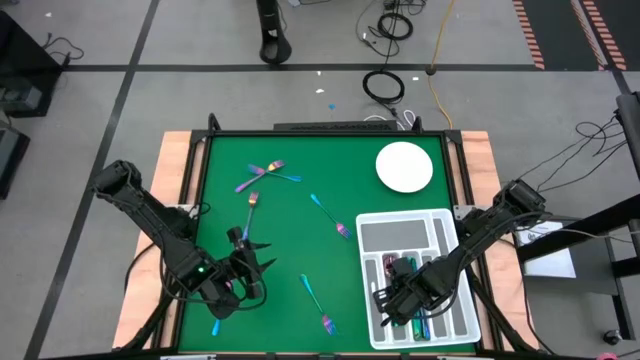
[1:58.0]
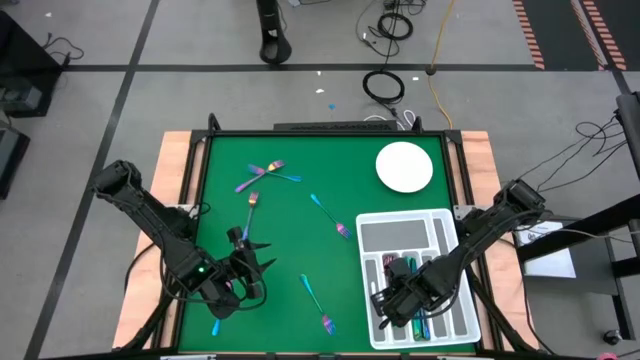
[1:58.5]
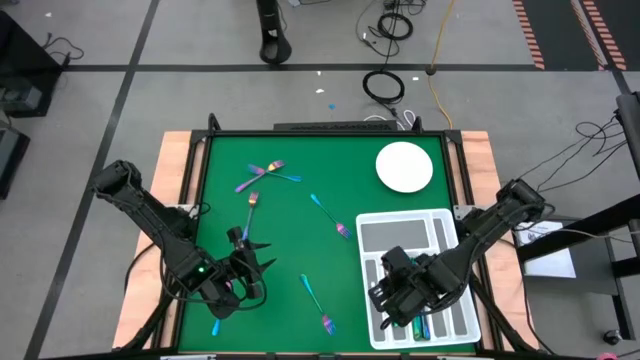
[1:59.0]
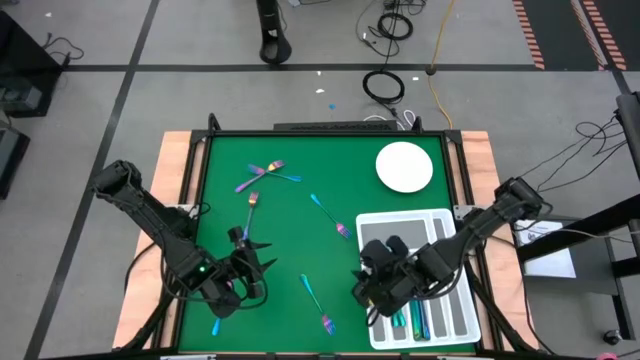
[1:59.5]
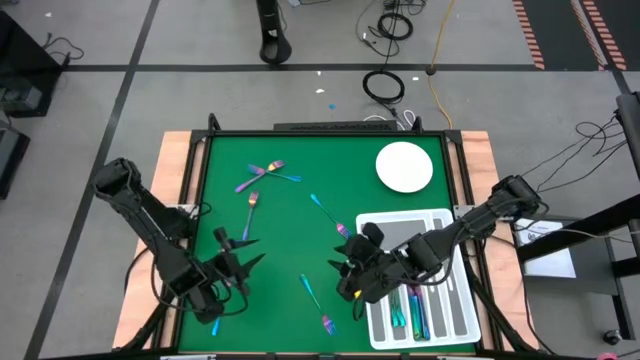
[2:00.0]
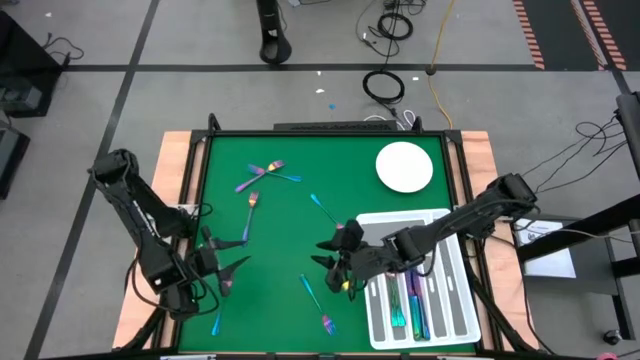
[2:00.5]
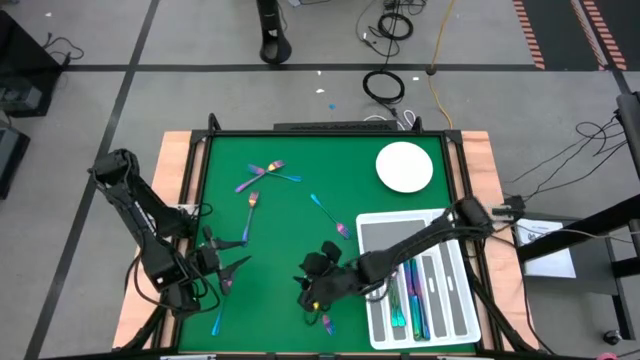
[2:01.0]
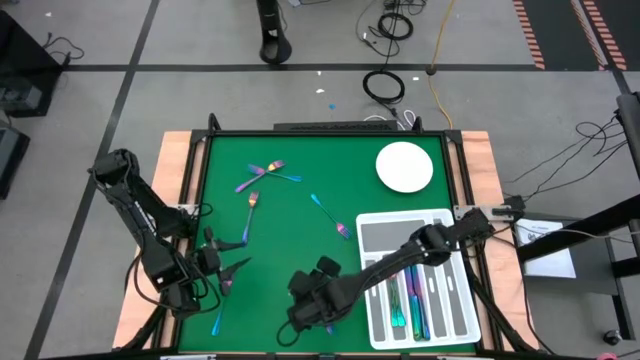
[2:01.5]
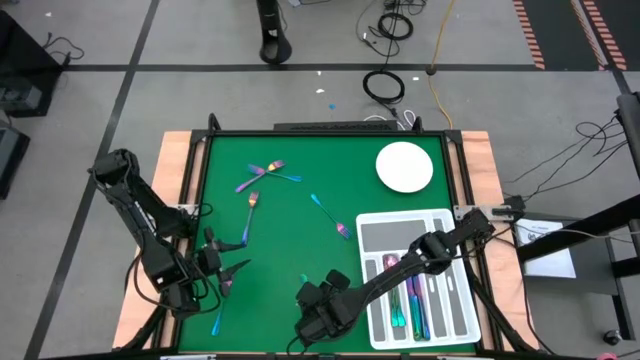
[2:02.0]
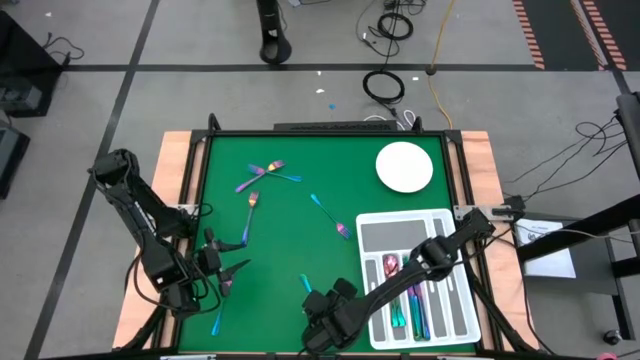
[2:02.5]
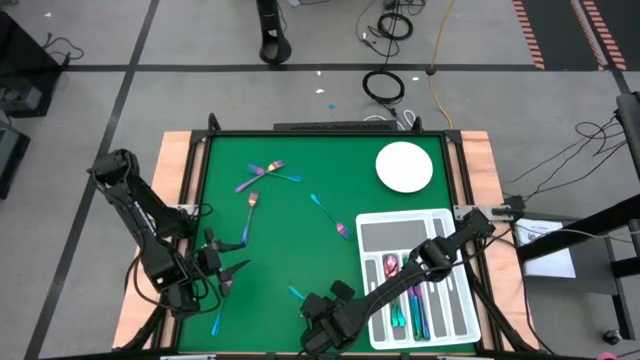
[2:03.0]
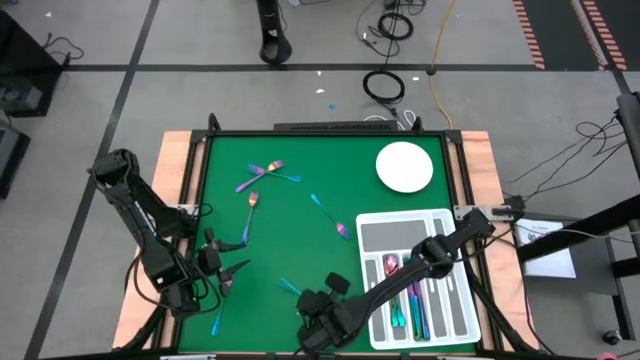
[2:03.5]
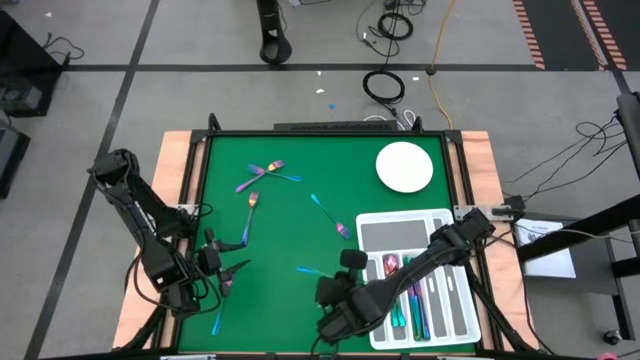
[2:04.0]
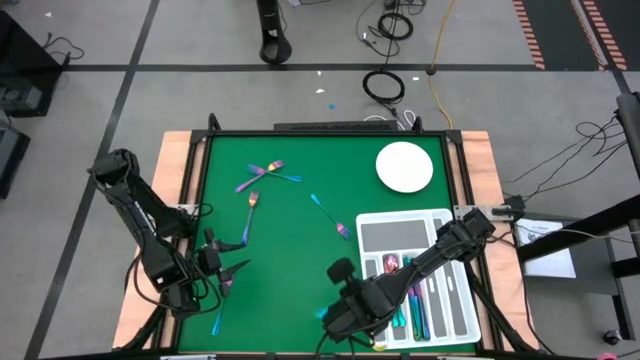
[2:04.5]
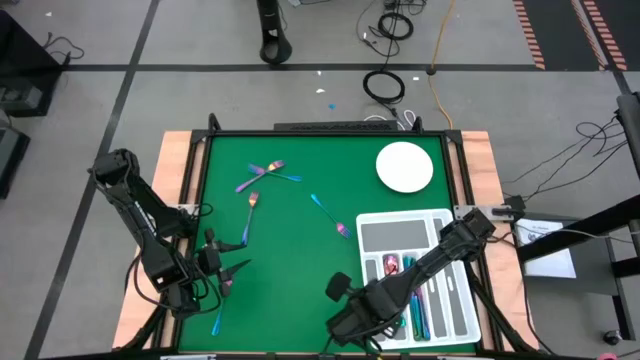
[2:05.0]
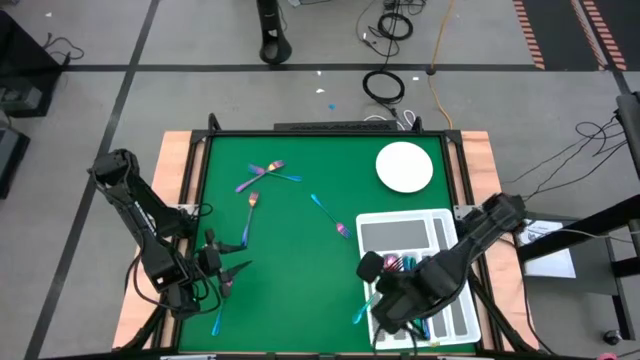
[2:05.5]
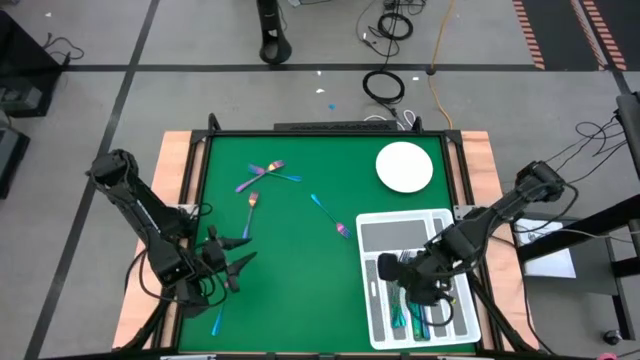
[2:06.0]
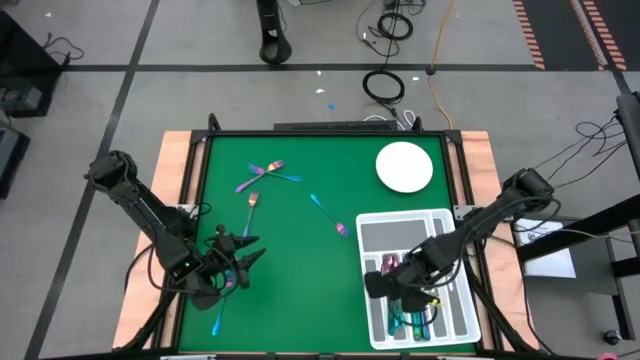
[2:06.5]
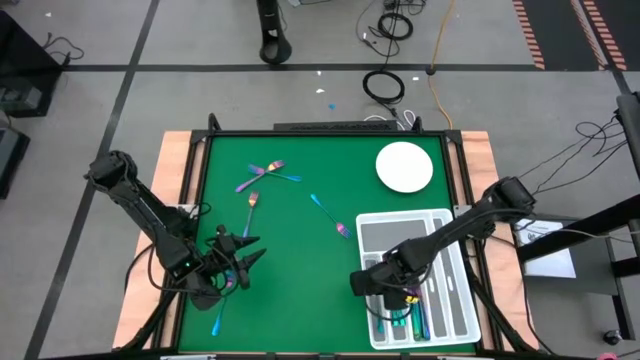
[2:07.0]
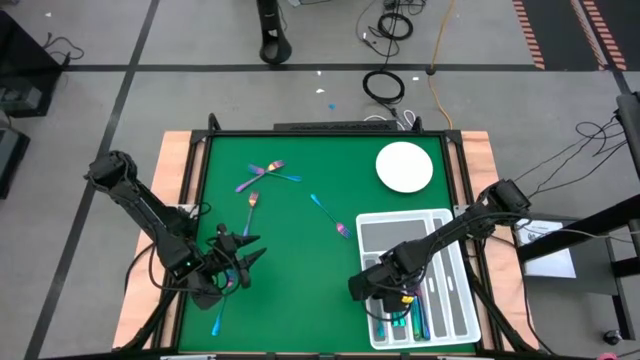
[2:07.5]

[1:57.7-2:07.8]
Task: Sort silverware
Put the bottom right fork into the utensil organizer

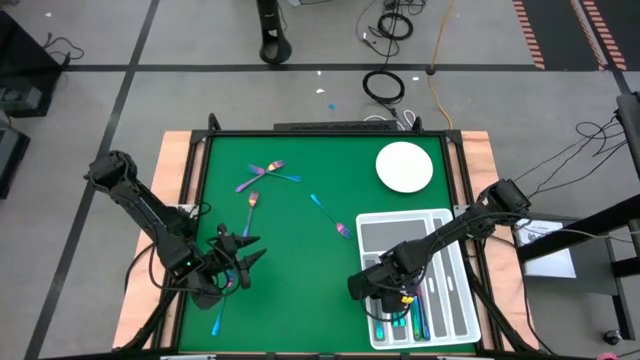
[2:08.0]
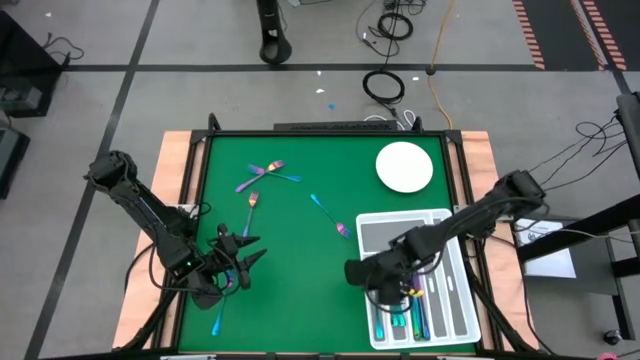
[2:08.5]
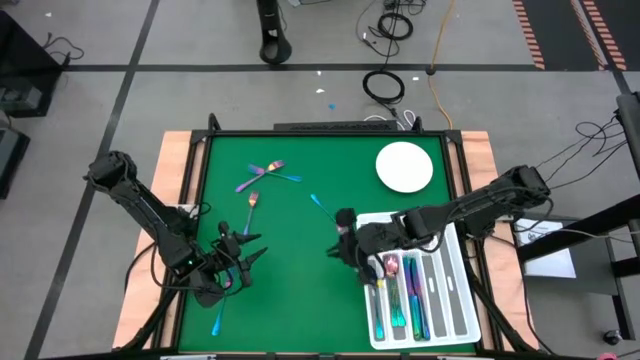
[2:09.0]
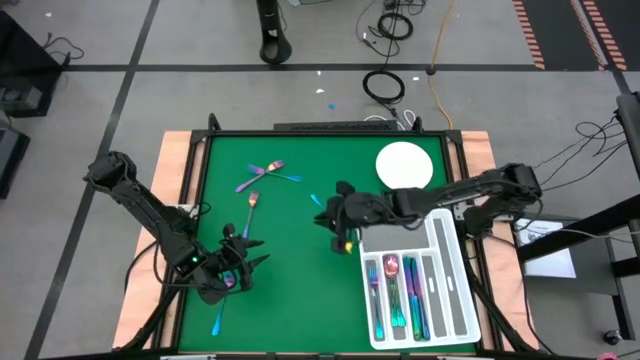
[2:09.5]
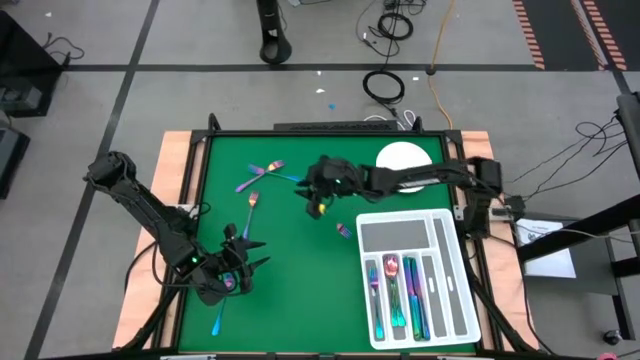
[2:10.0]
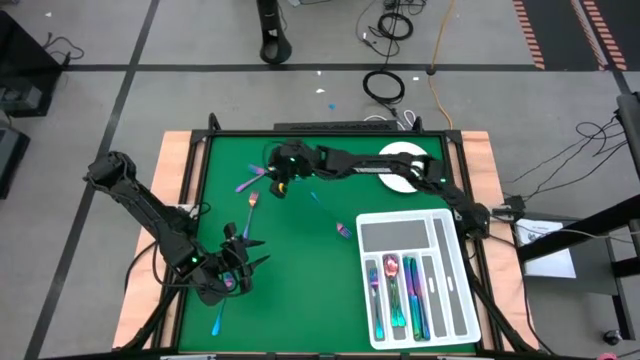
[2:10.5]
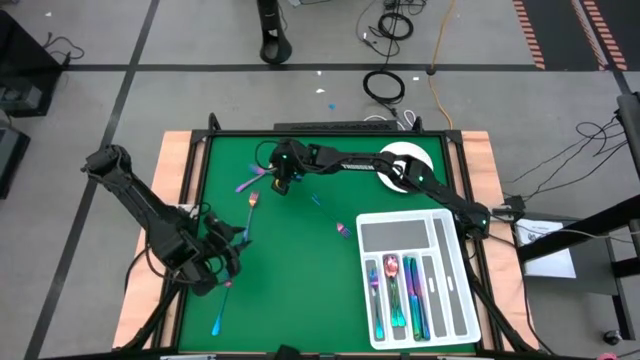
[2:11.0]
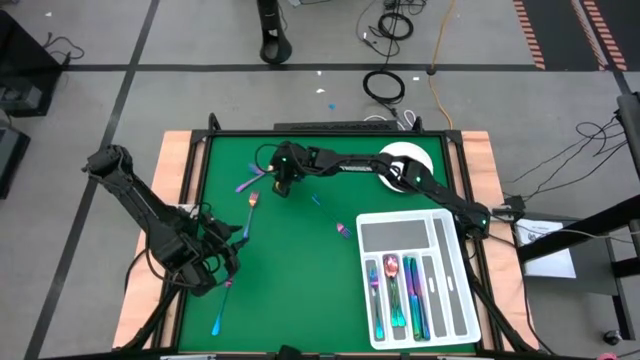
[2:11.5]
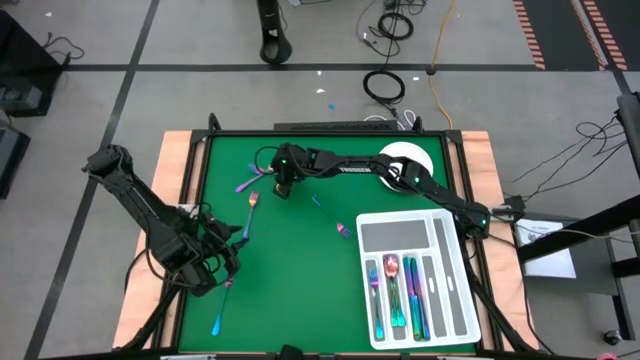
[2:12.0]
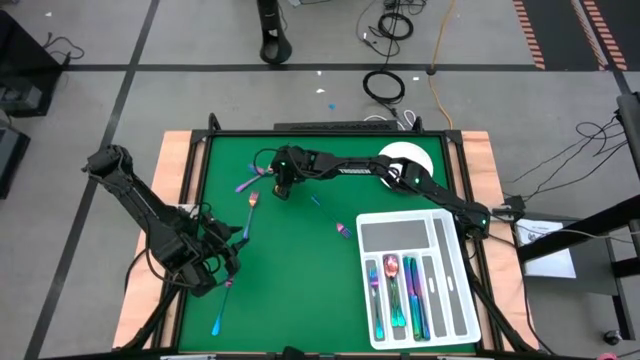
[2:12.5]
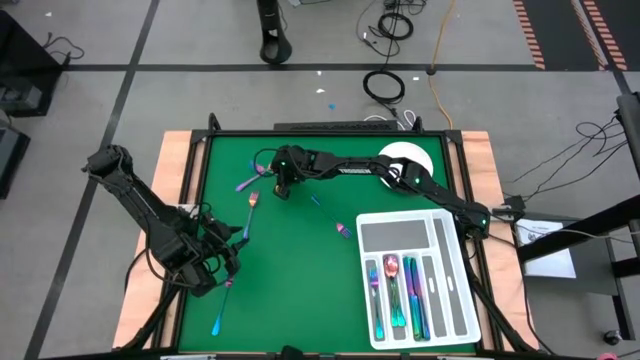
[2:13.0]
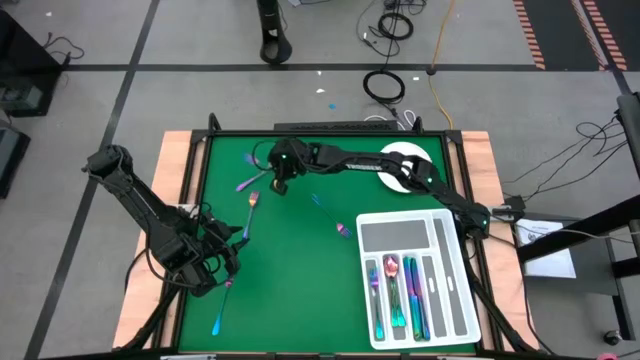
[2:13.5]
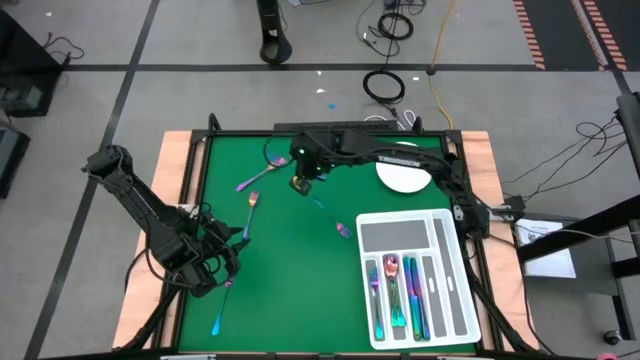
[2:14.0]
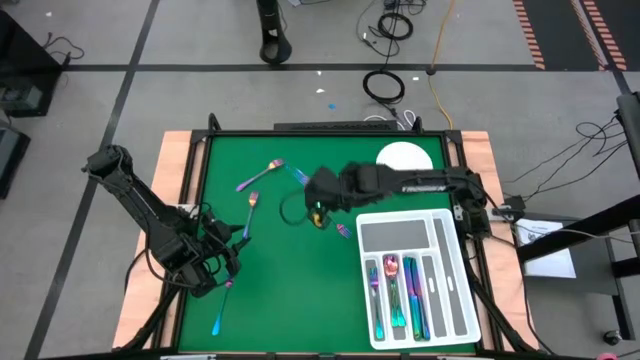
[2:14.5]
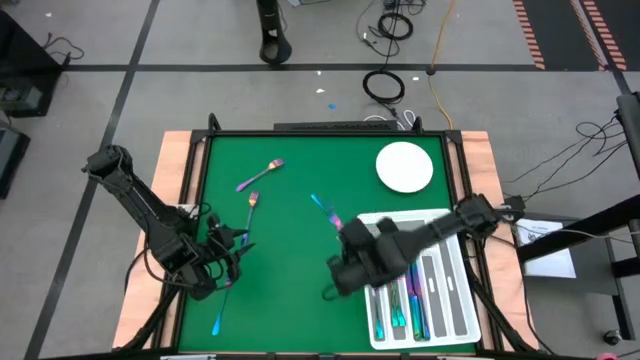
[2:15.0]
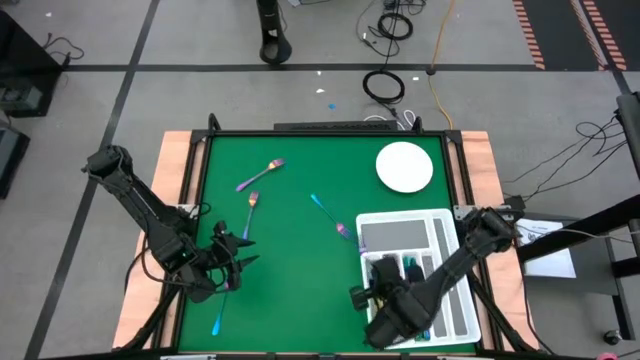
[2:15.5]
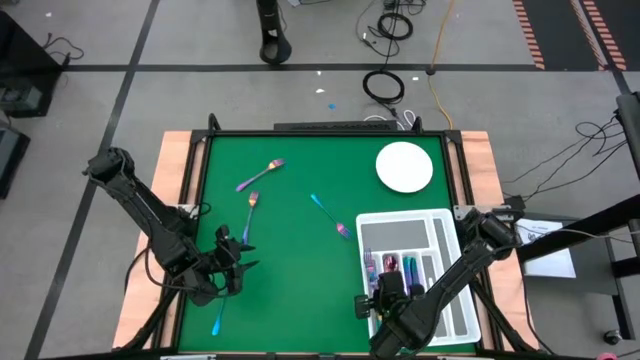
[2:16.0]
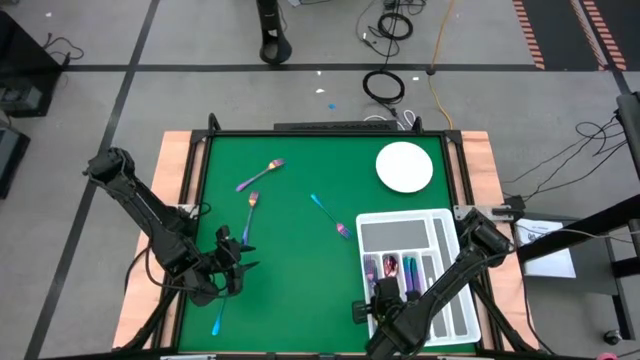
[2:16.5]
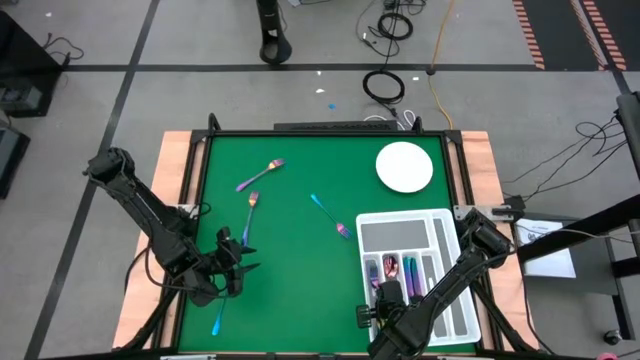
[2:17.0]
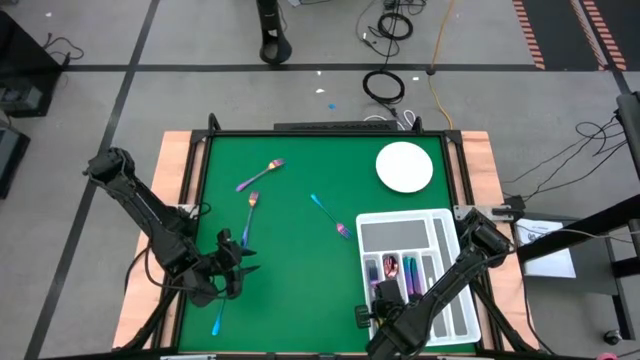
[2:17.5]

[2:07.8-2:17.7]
Put the top left fork into the utensil organizer
